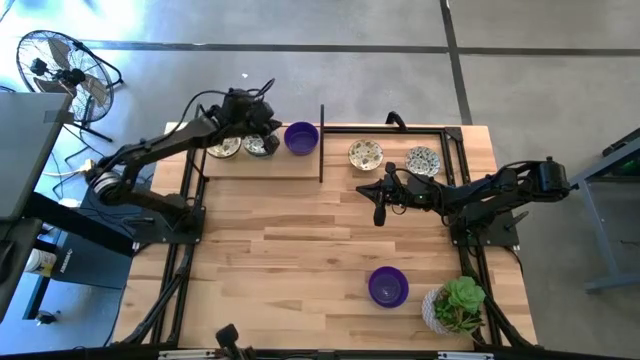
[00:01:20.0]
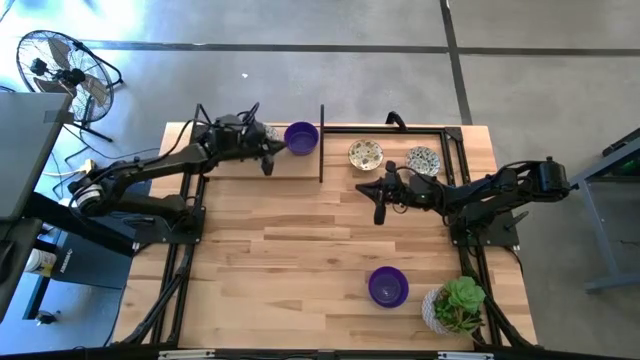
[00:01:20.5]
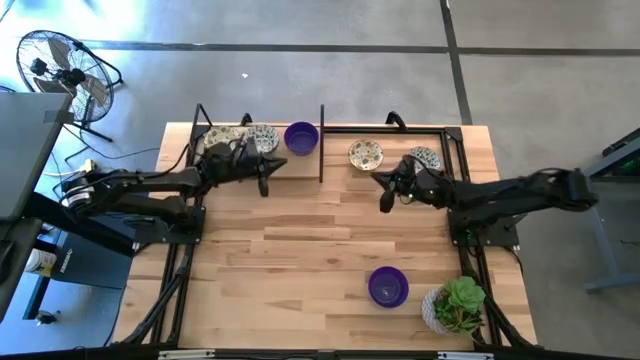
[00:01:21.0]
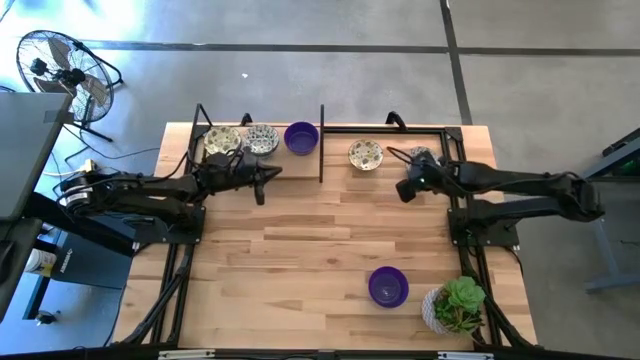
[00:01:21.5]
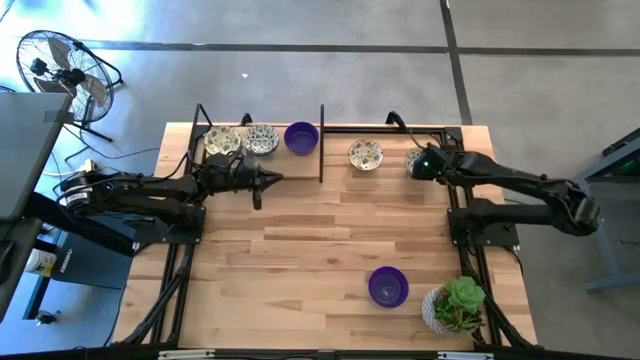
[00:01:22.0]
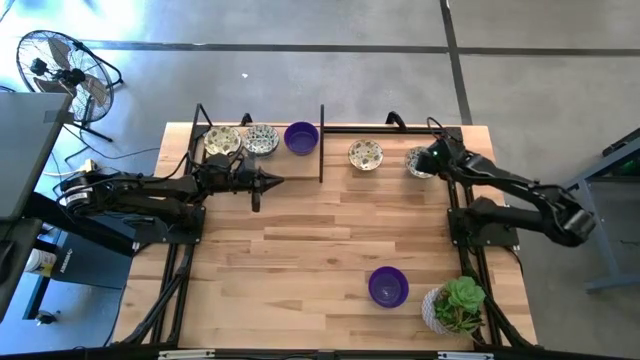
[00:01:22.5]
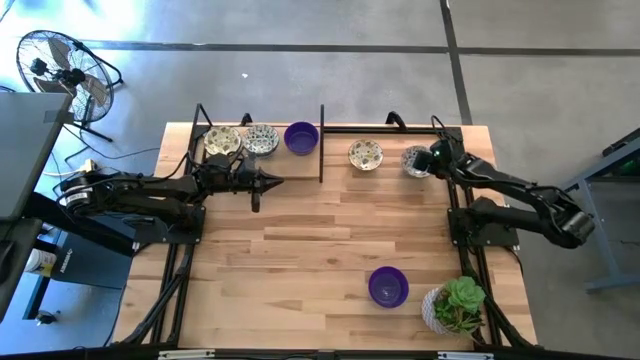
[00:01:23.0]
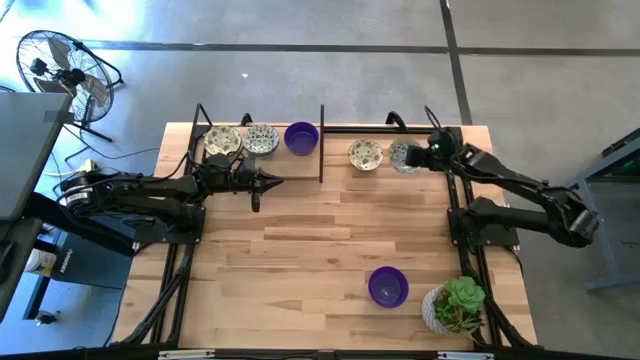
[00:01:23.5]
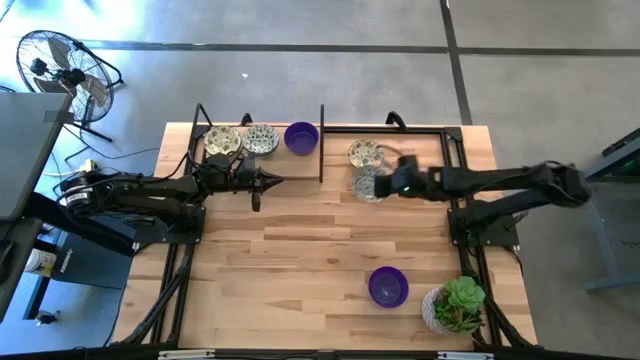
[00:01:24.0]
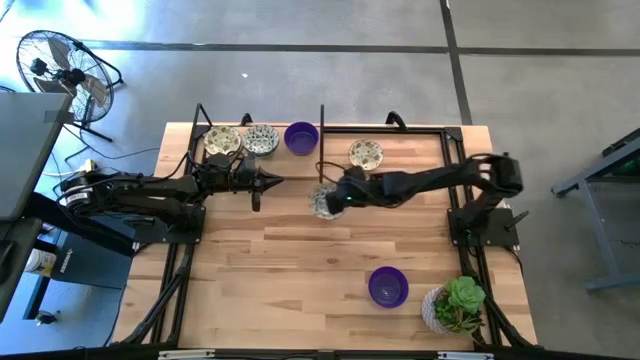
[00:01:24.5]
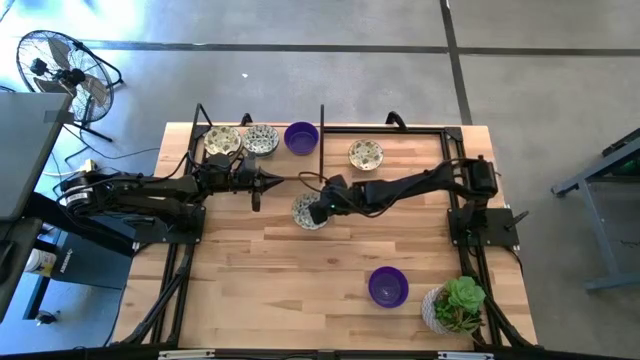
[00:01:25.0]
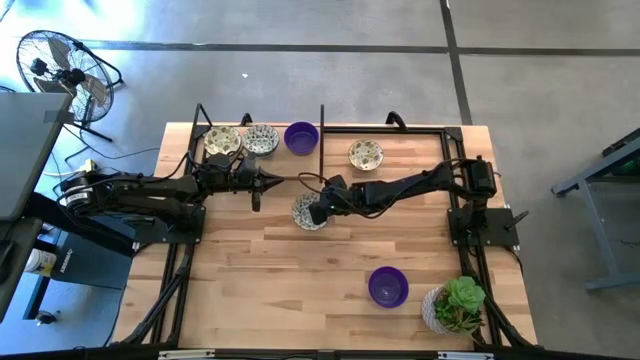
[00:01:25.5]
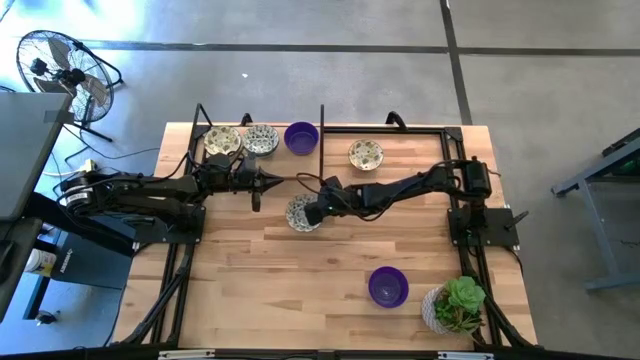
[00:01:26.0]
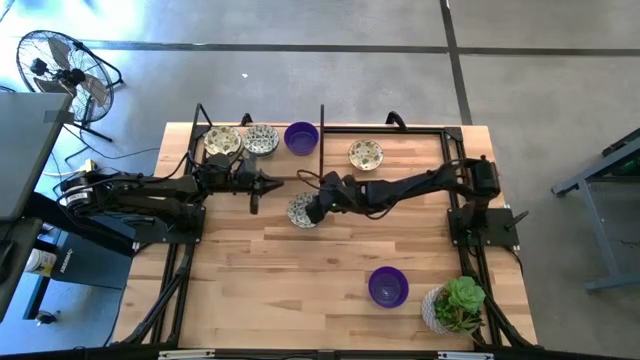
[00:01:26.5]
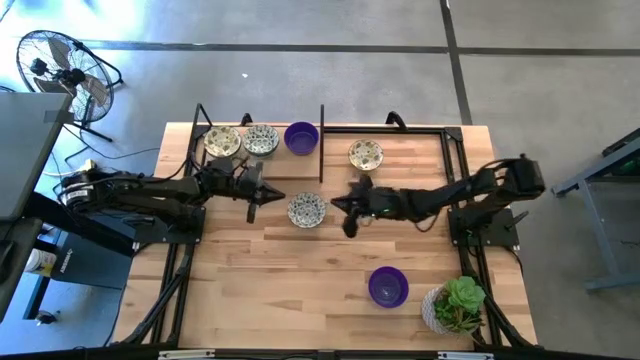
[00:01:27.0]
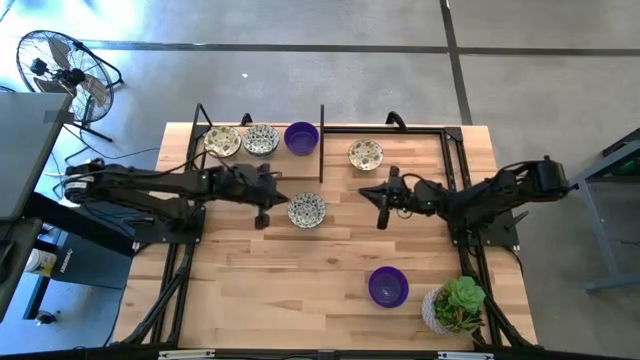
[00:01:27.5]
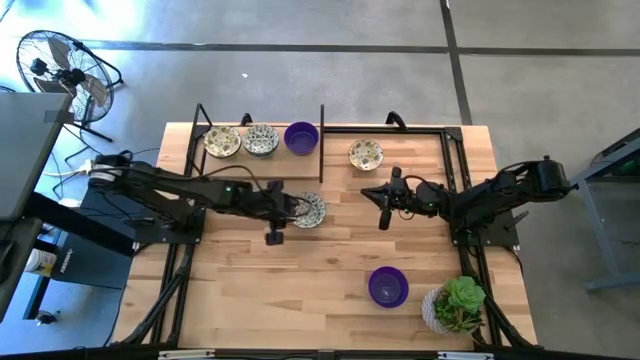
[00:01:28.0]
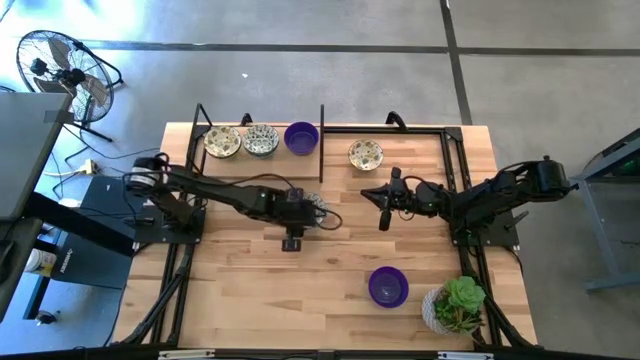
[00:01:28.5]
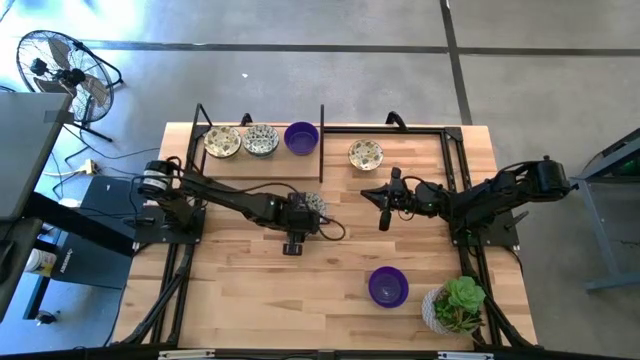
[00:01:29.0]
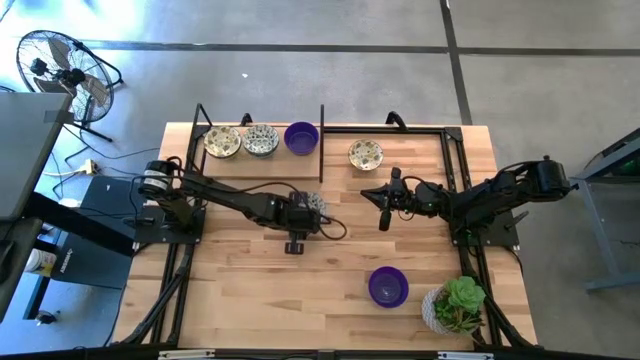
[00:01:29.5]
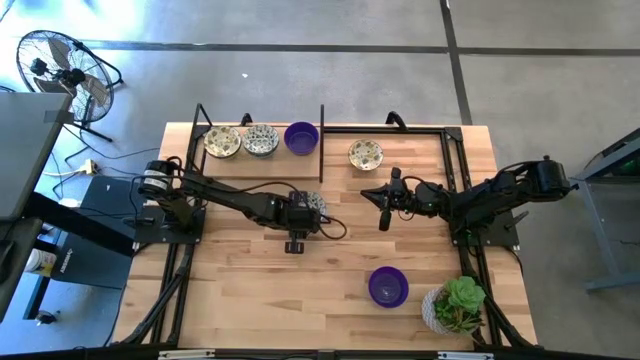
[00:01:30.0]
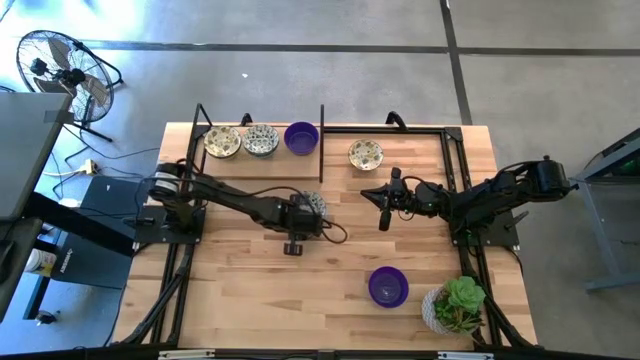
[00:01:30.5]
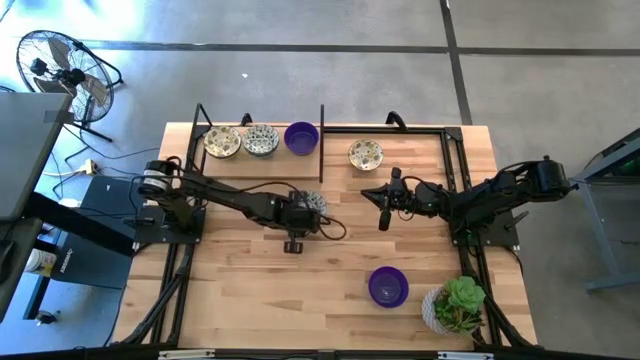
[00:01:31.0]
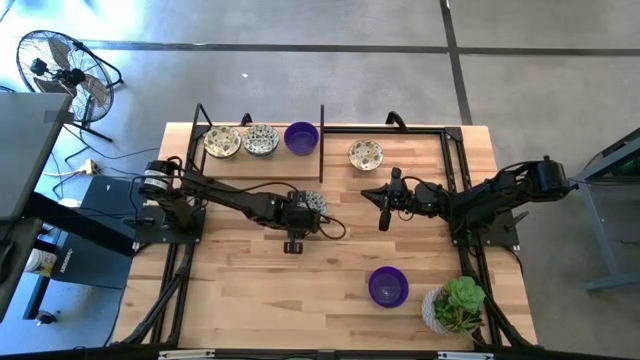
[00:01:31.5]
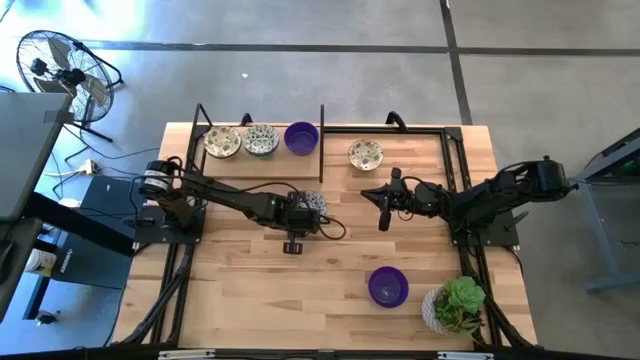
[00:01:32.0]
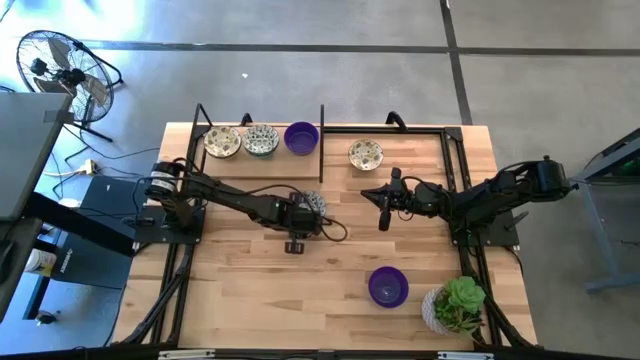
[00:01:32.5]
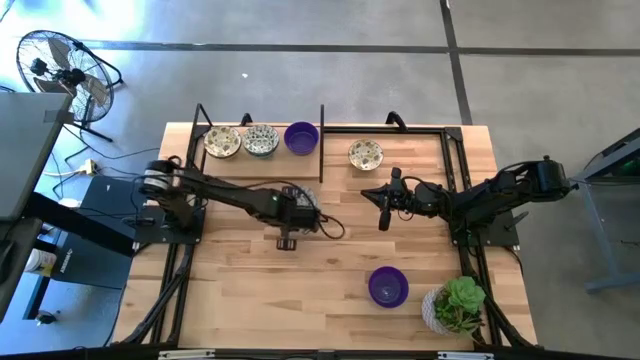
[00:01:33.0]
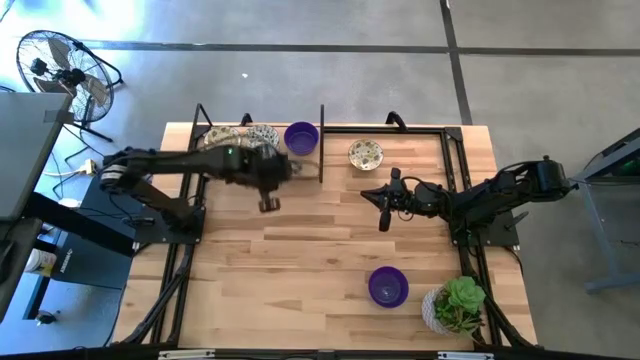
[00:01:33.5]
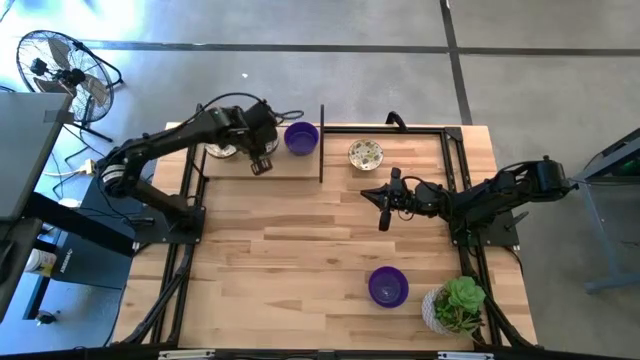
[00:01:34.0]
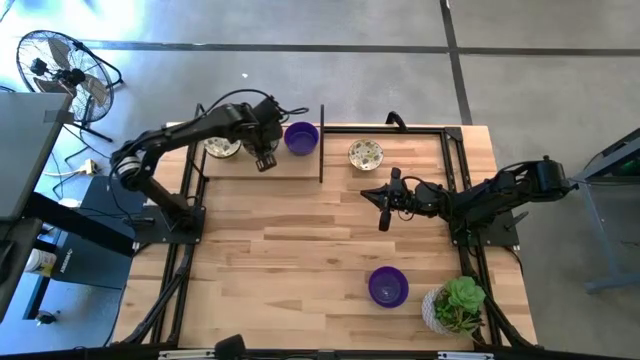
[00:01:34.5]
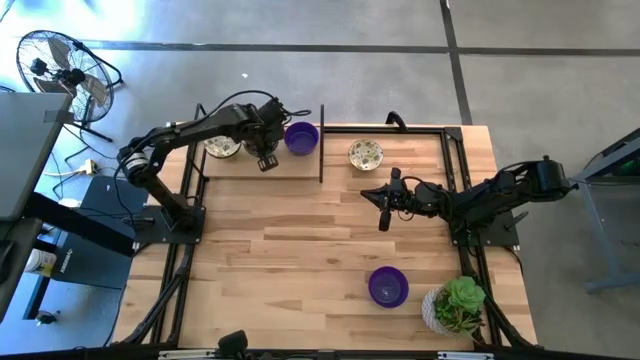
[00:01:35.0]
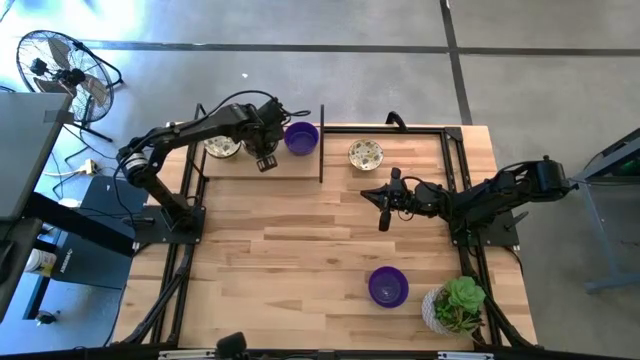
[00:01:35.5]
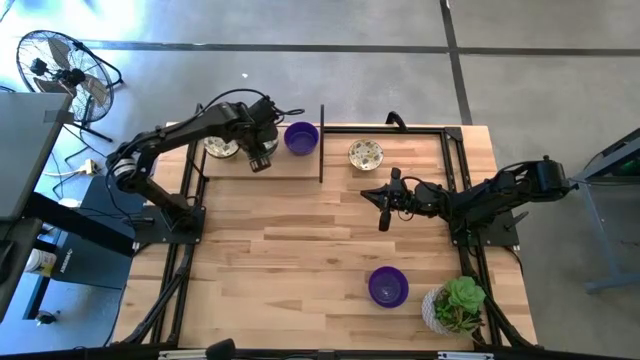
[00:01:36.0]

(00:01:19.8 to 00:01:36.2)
Task: Pick & Place Mini bowls
Stack the light blue bowl on top of the other light blue bowls on the shelf
